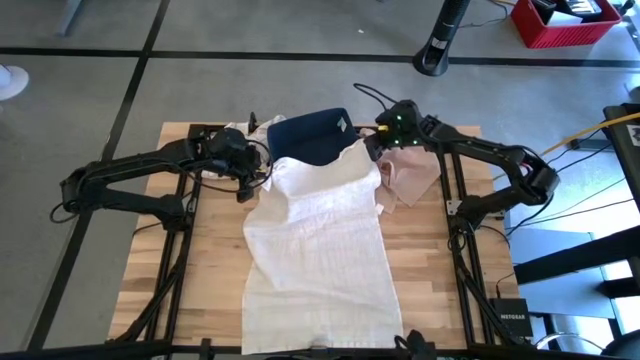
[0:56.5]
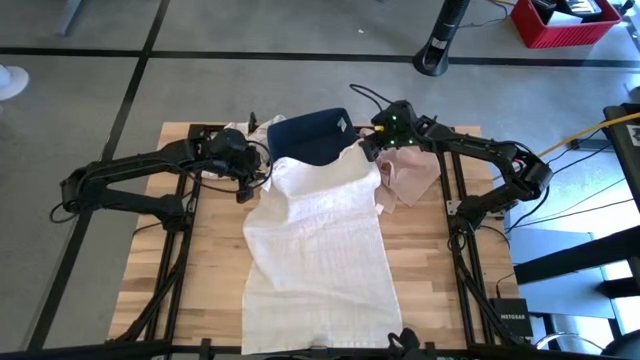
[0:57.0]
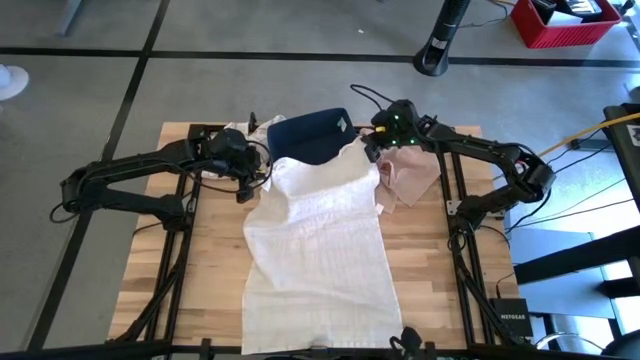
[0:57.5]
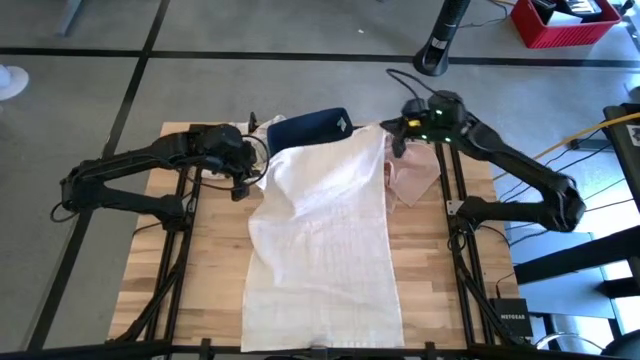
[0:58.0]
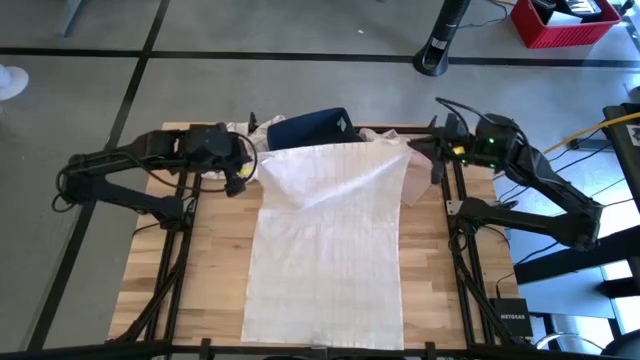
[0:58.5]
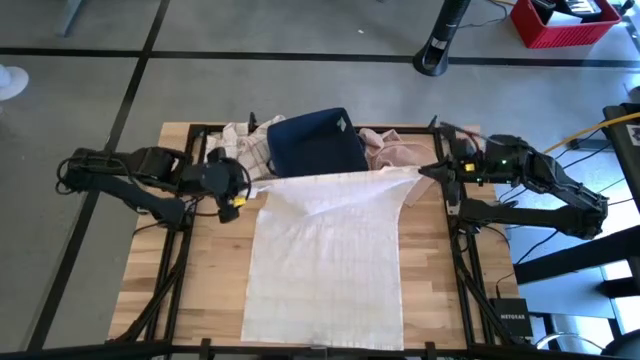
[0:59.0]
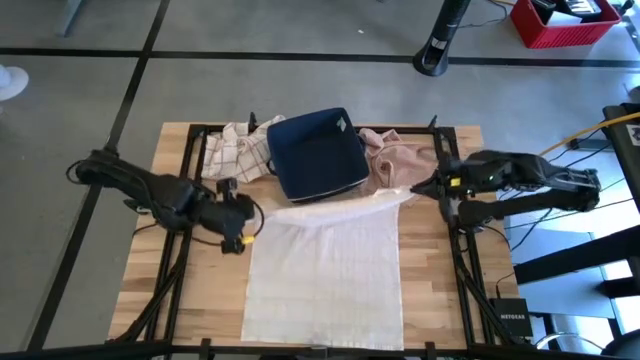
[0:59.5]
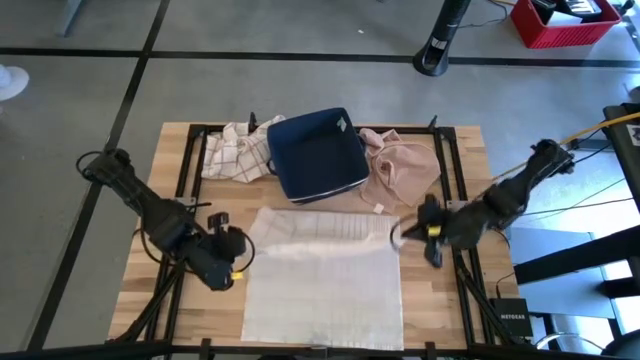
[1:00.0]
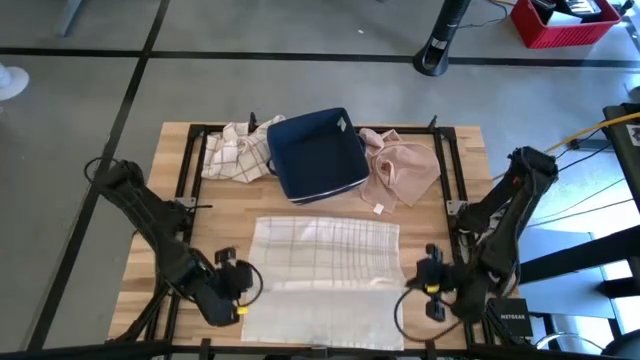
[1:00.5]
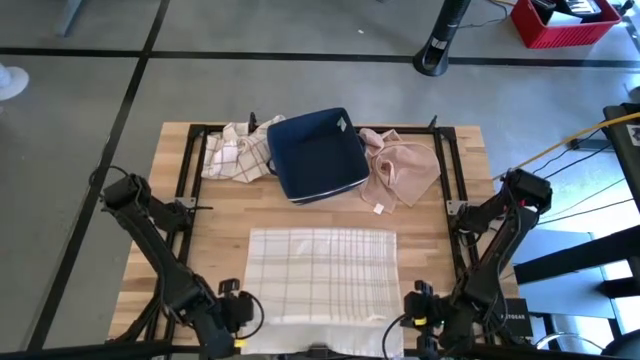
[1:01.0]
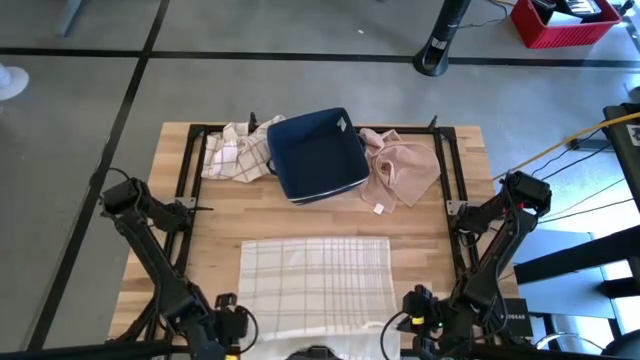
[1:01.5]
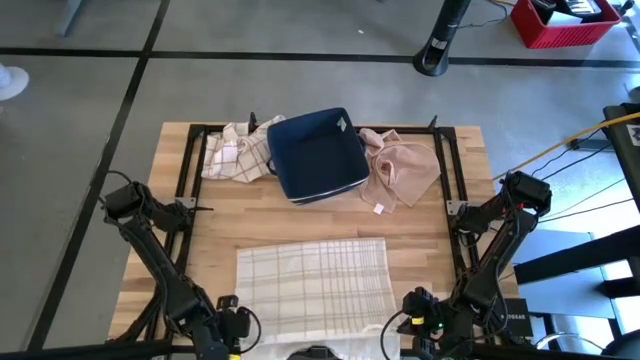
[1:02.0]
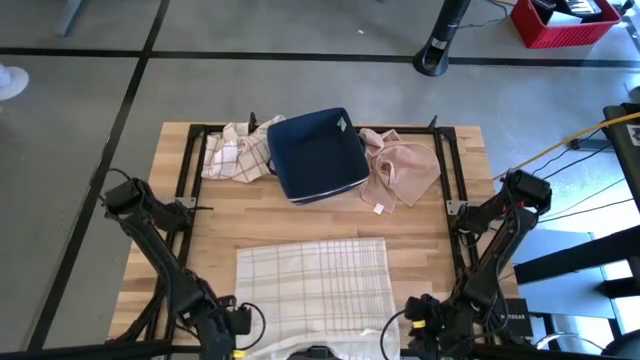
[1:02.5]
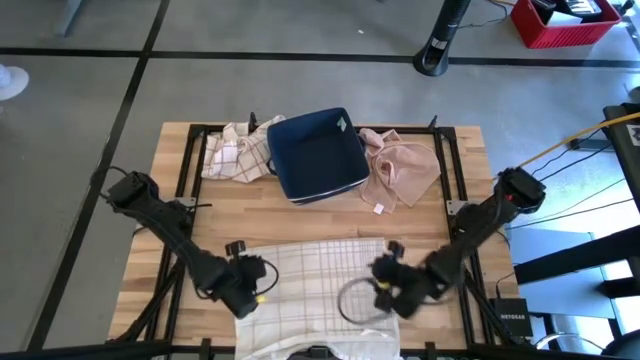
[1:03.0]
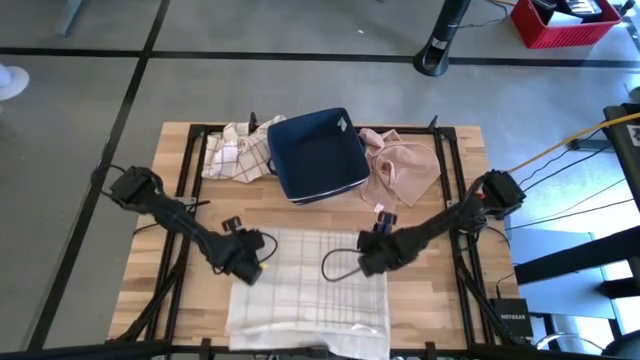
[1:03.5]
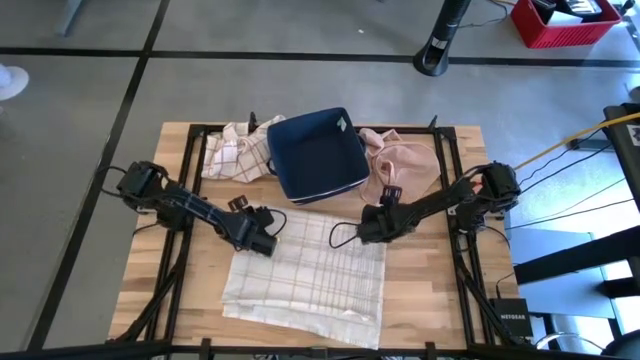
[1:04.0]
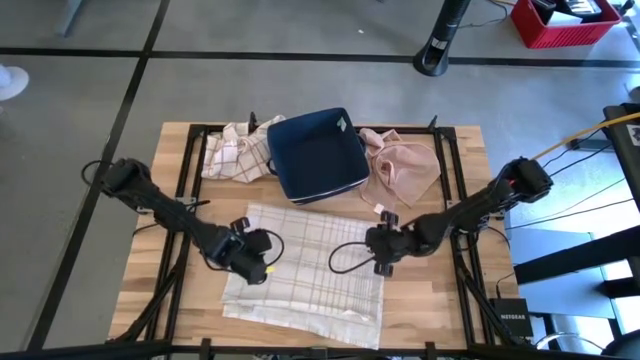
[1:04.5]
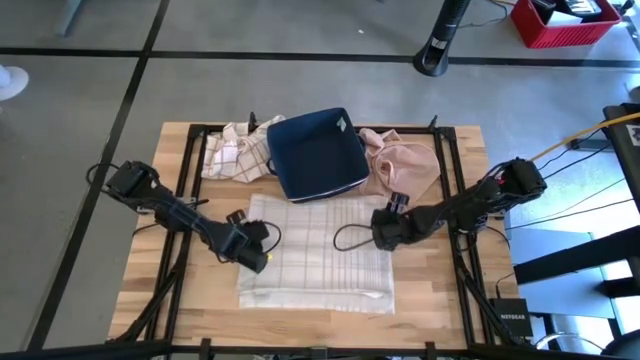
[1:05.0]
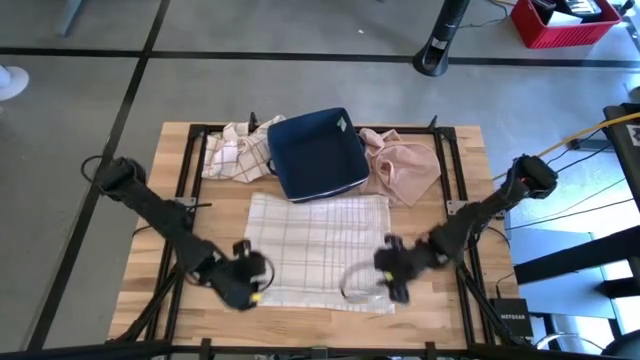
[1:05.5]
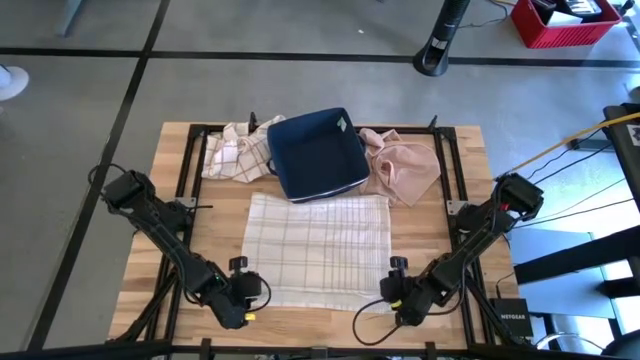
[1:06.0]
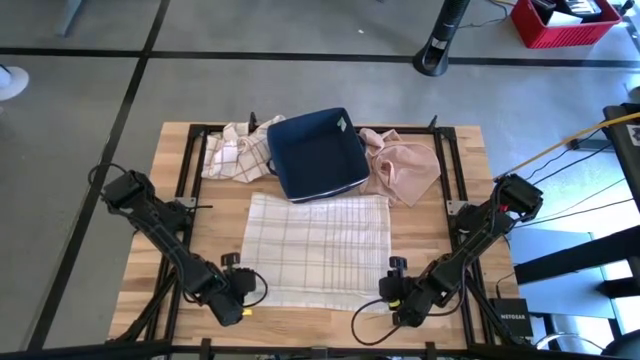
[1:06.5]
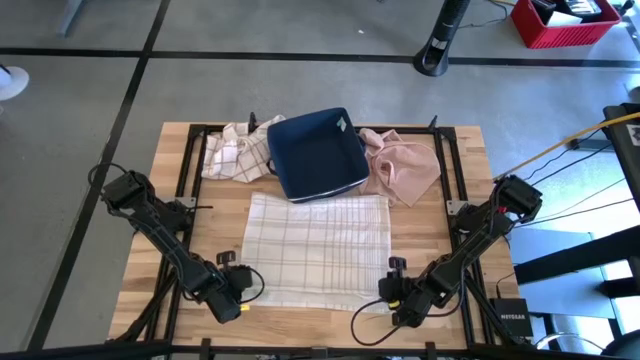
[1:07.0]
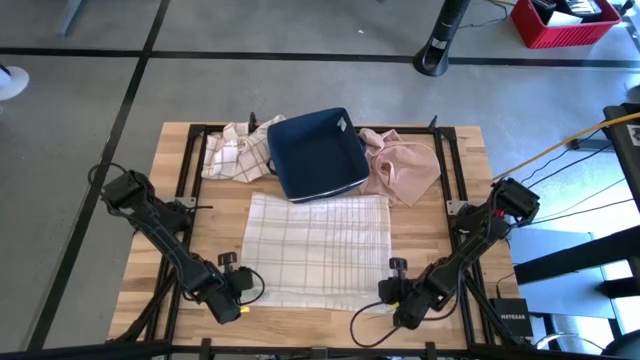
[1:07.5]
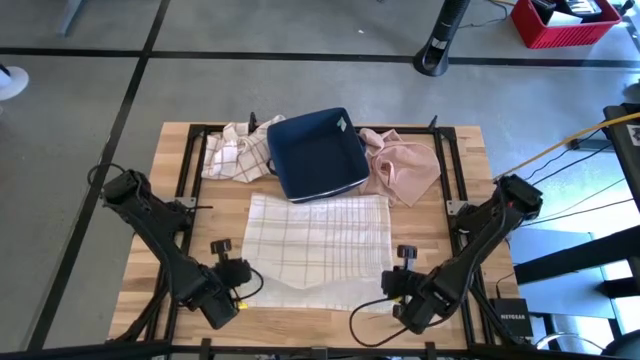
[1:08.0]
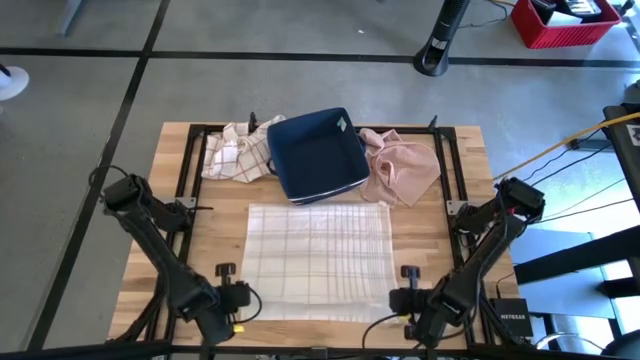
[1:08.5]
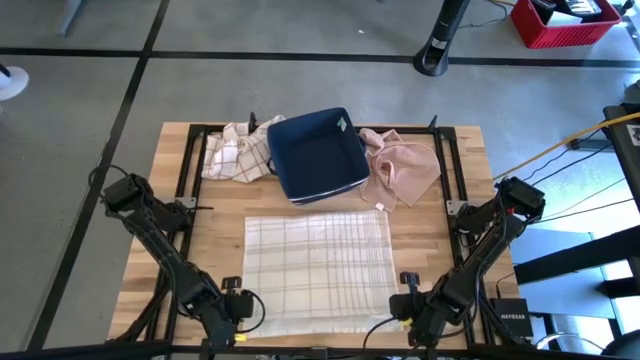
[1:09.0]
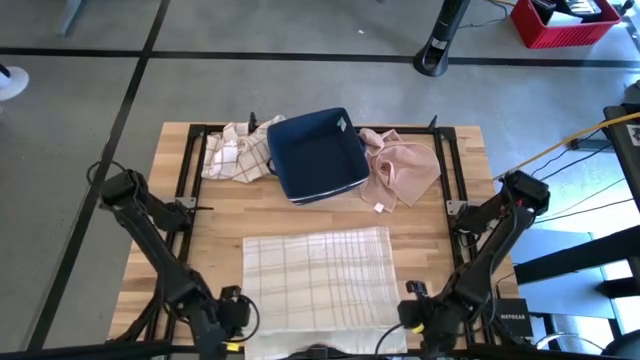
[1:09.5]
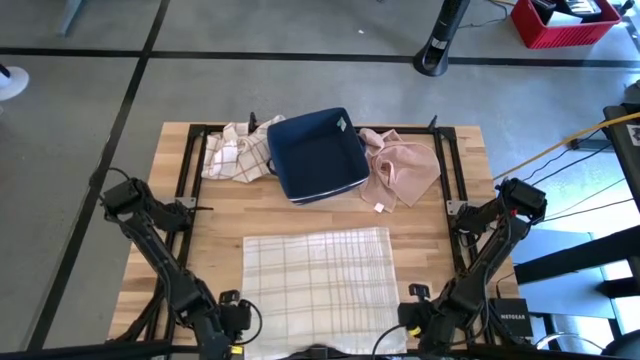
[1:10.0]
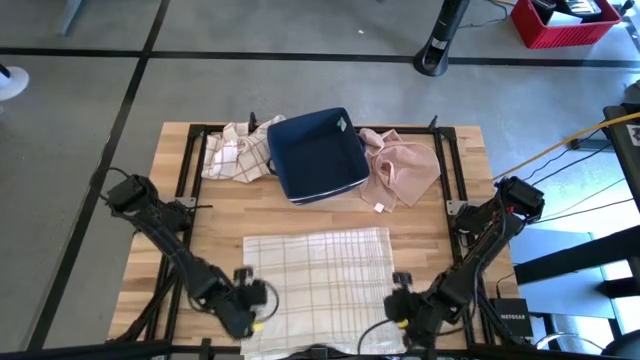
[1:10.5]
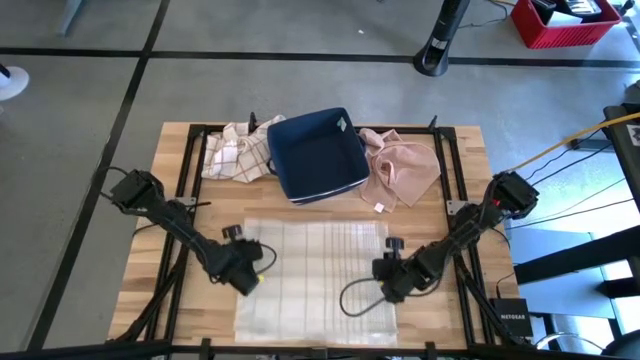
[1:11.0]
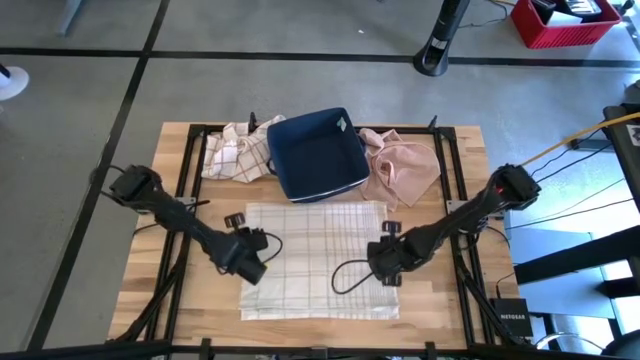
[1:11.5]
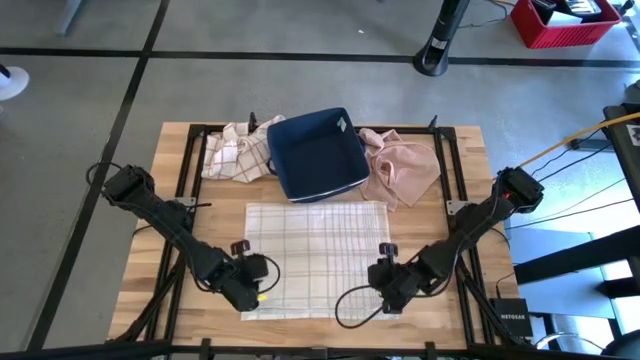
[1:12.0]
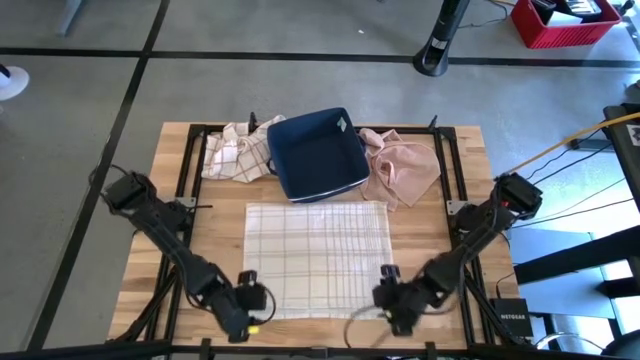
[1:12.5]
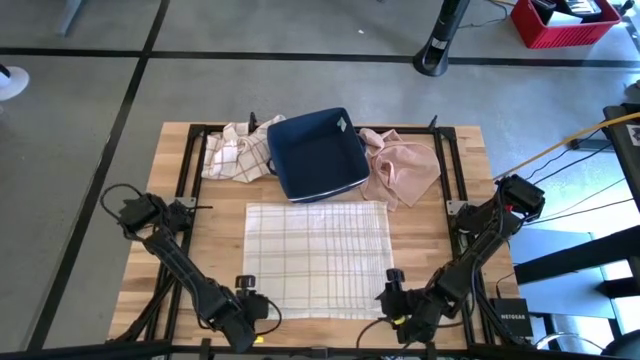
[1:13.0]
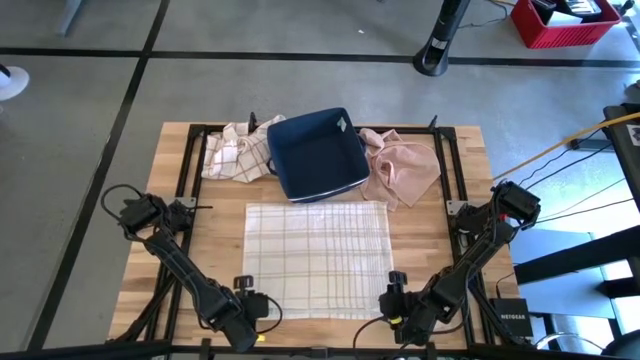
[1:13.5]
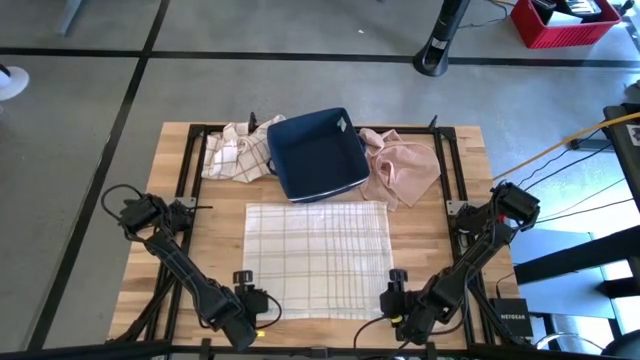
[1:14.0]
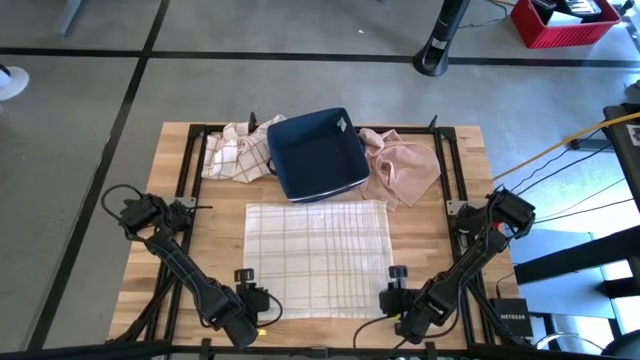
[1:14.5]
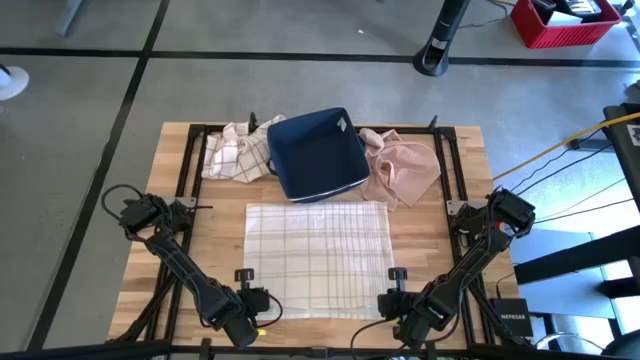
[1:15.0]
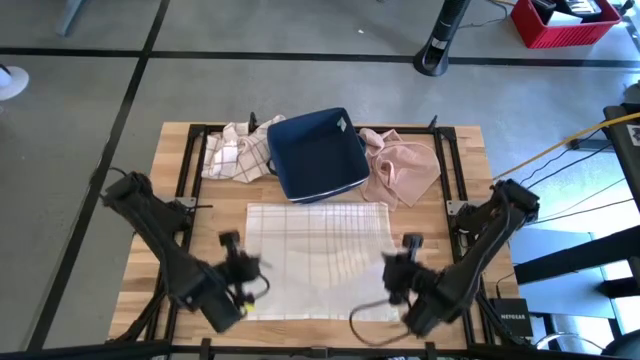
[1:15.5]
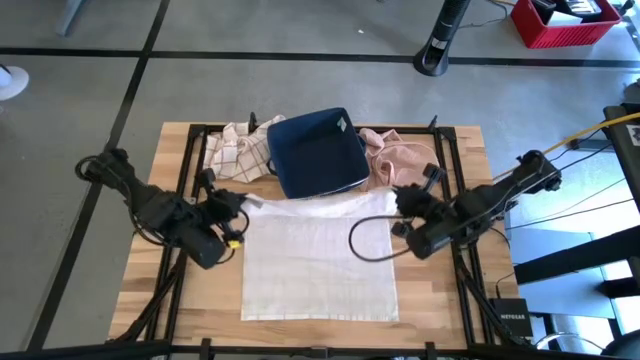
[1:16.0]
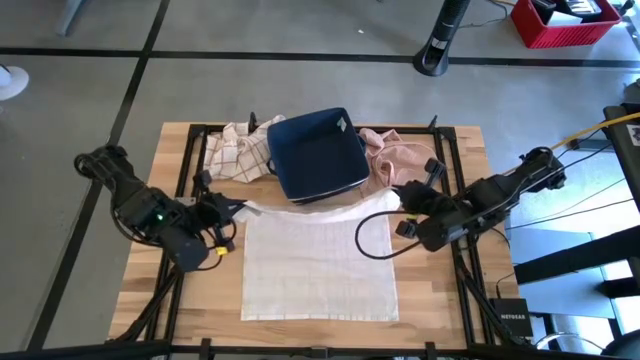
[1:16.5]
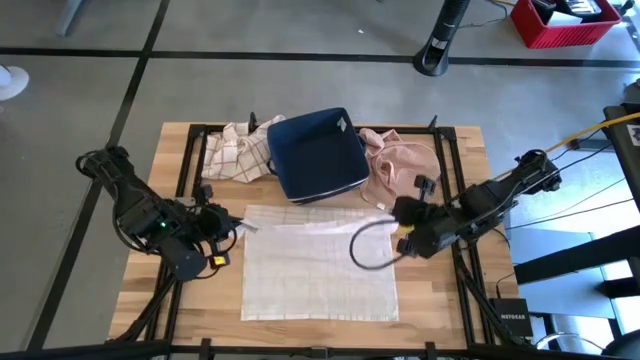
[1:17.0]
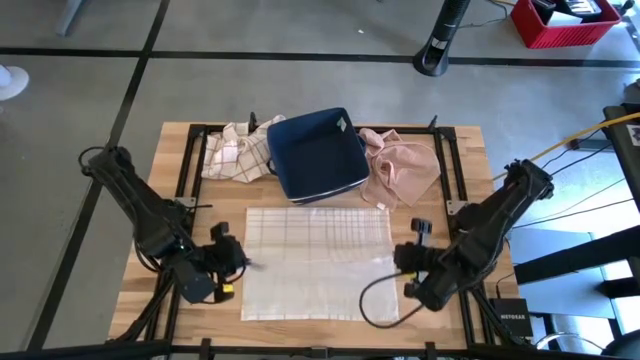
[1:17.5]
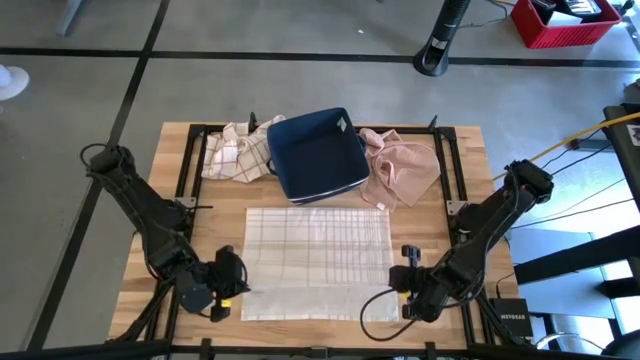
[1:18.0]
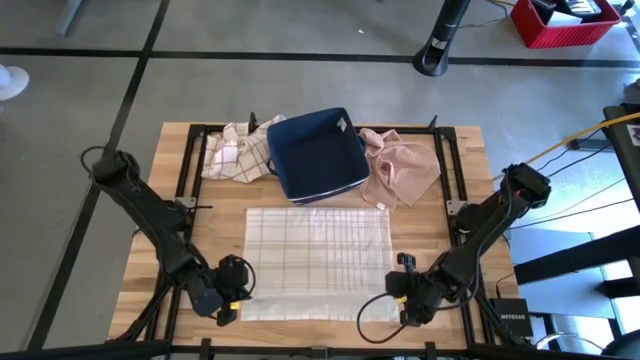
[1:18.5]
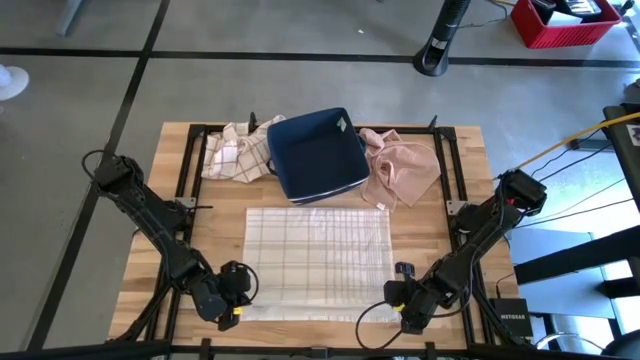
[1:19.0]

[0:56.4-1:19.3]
Task: Fold towel
Fold the white with gray pattern towel on the table
